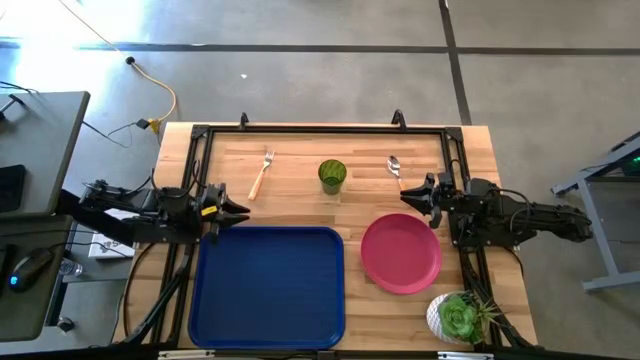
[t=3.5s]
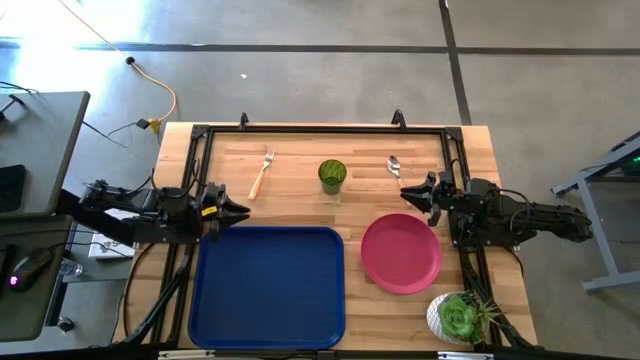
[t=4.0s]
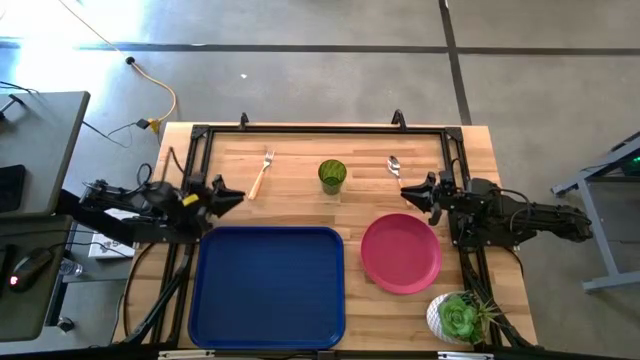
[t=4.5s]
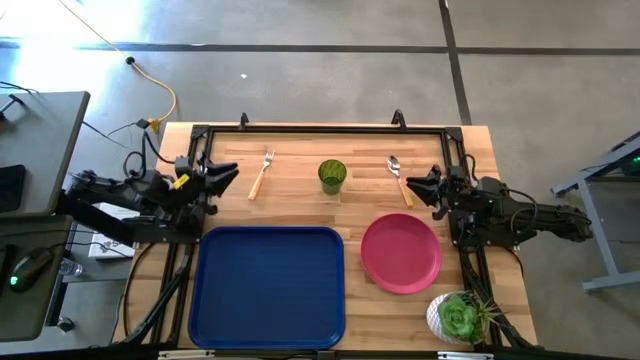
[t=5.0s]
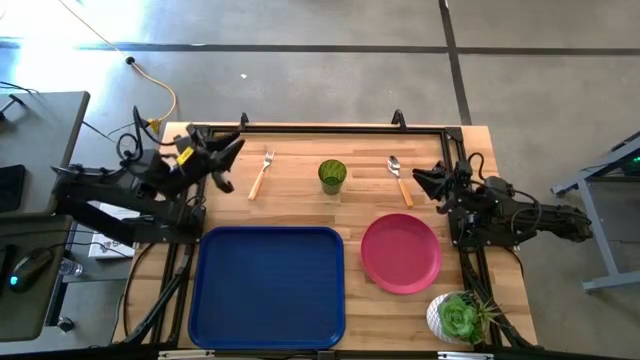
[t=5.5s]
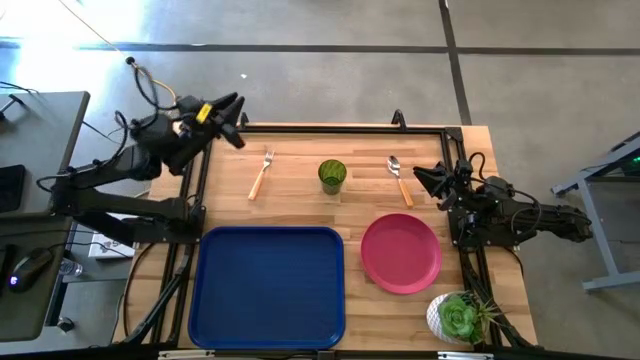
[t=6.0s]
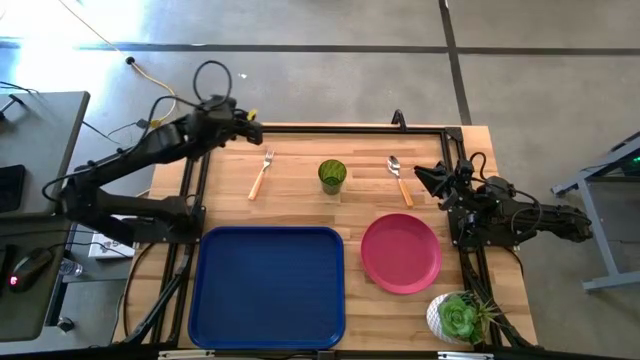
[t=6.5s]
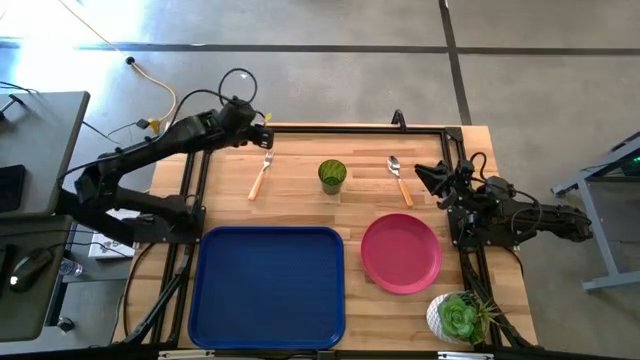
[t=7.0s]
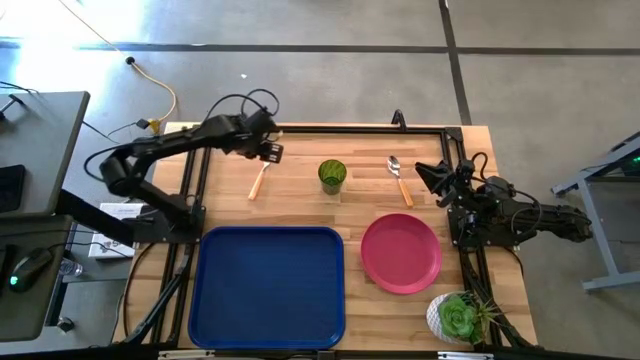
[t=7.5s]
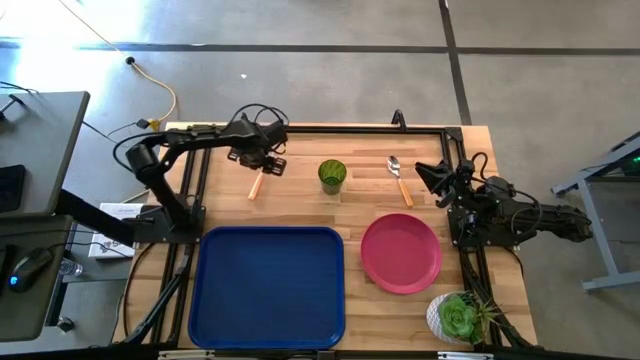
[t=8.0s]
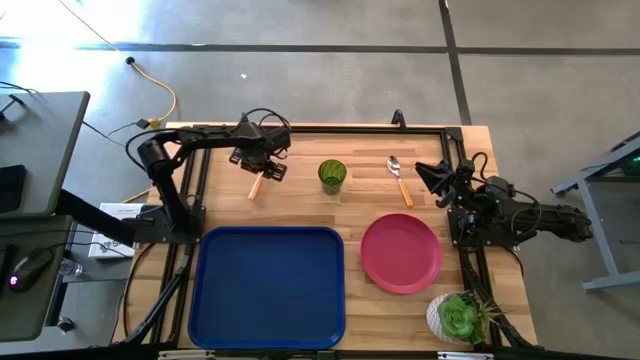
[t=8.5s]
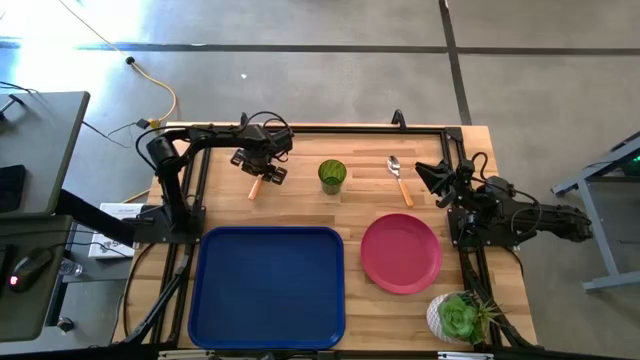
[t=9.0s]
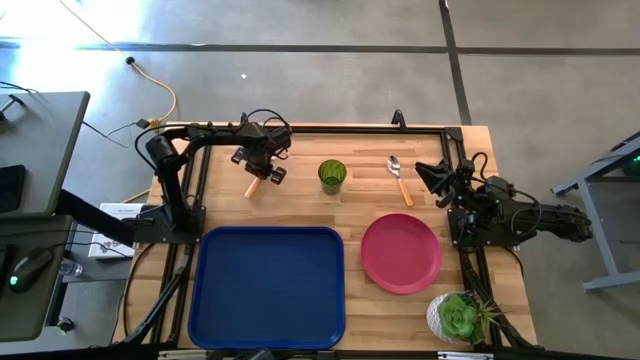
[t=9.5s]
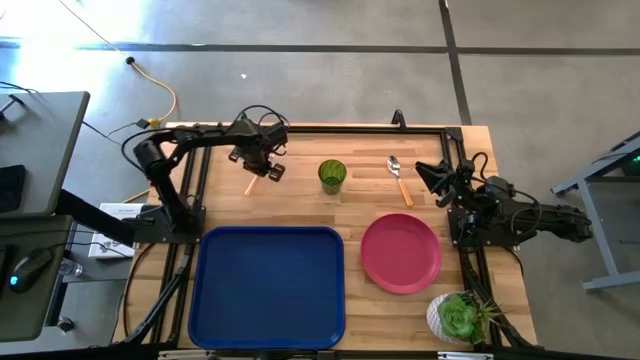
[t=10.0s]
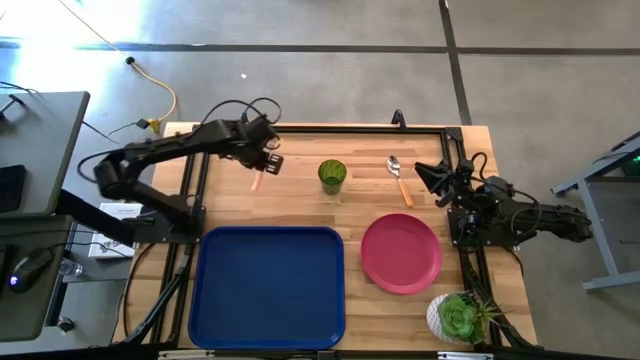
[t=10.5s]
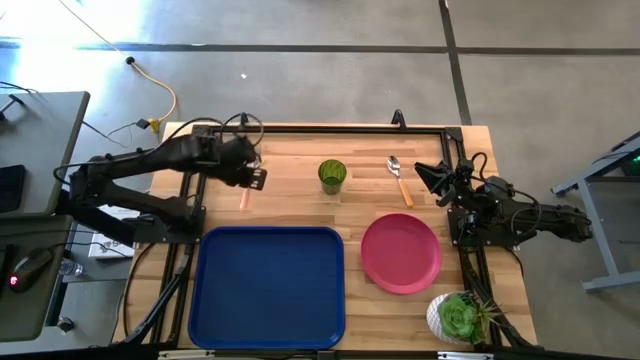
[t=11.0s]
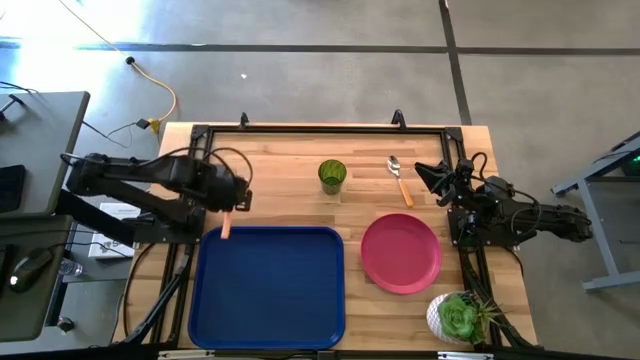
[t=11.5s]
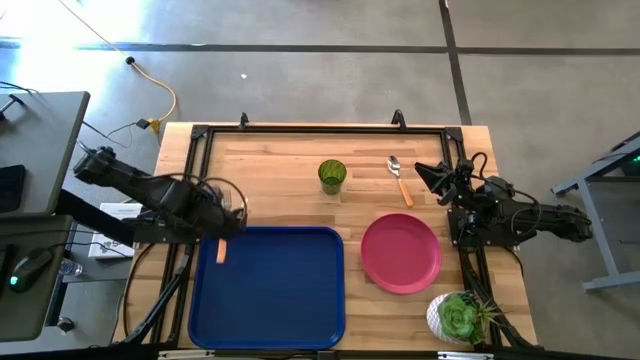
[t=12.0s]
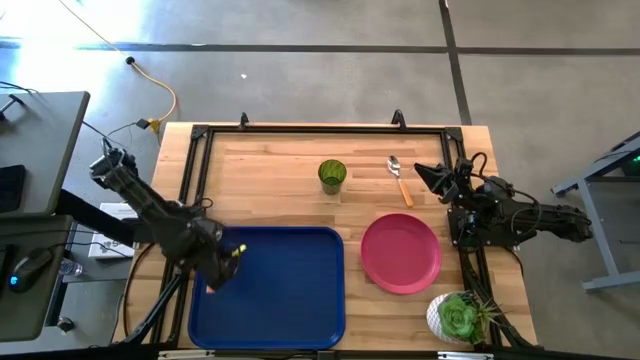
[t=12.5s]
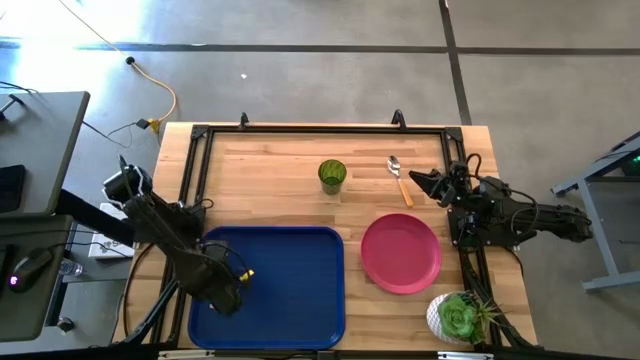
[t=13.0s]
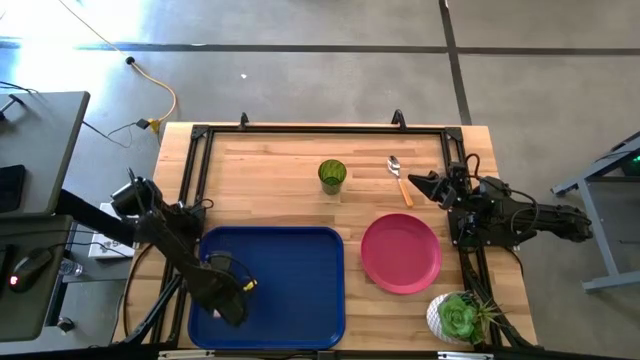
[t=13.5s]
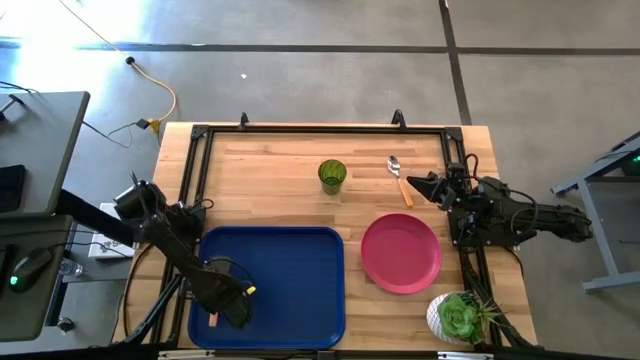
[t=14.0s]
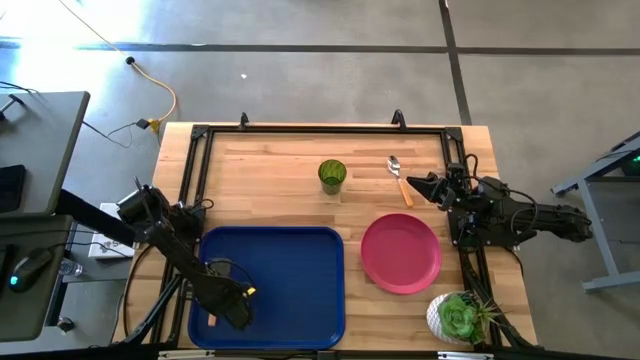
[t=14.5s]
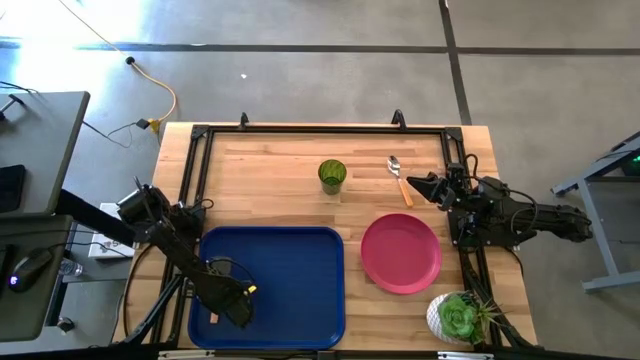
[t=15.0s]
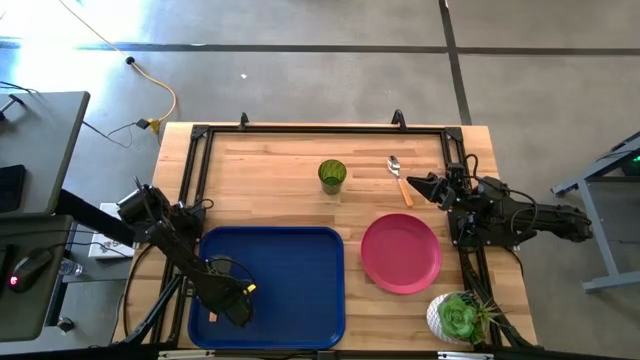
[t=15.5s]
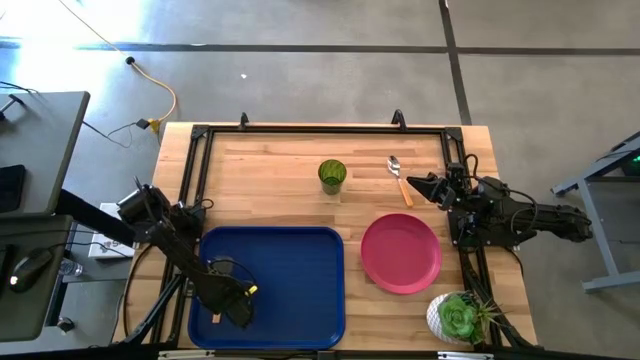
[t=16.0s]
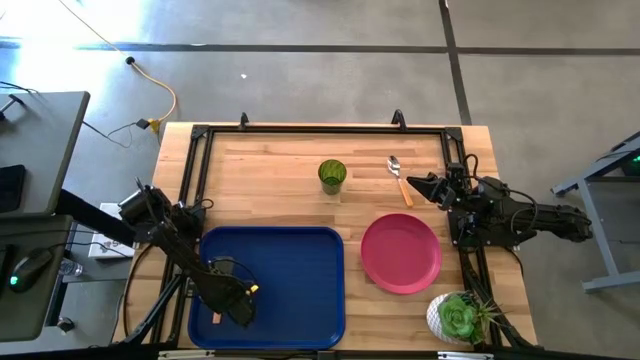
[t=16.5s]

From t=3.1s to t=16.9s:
Task: Pick and place plate/cup/fork/spoon on tray
Put the orange fork on the blue tray

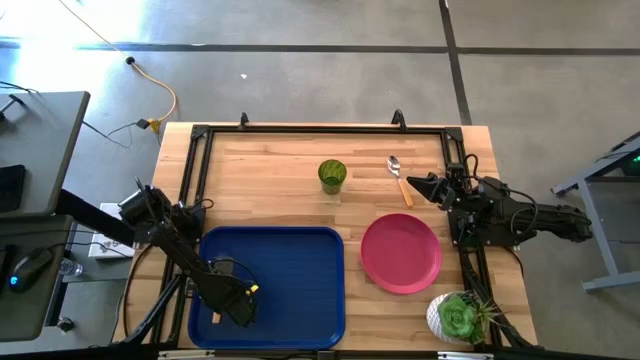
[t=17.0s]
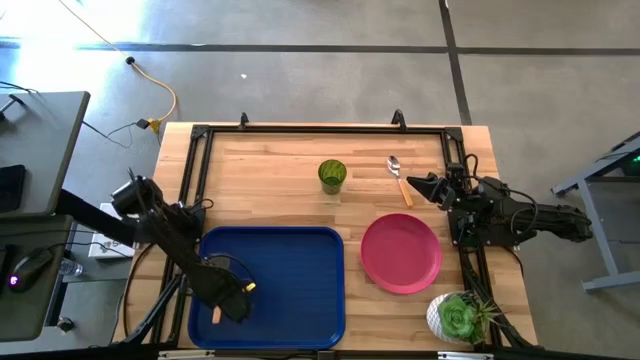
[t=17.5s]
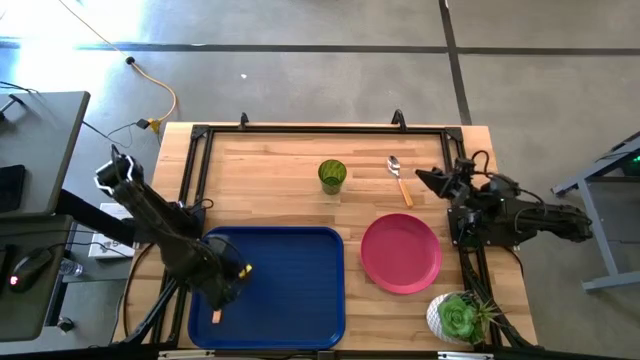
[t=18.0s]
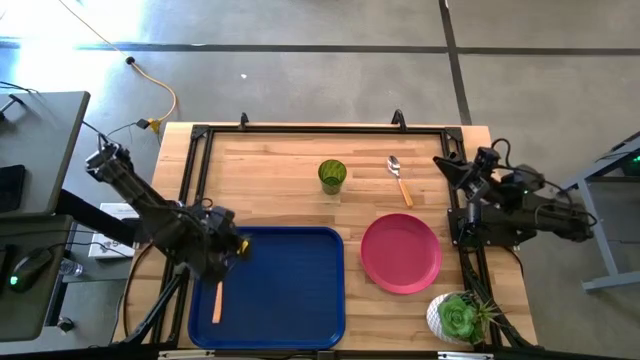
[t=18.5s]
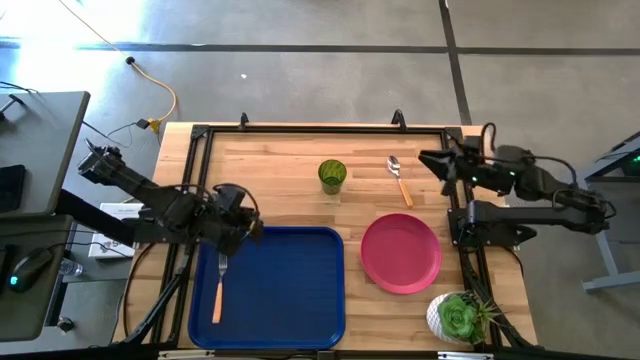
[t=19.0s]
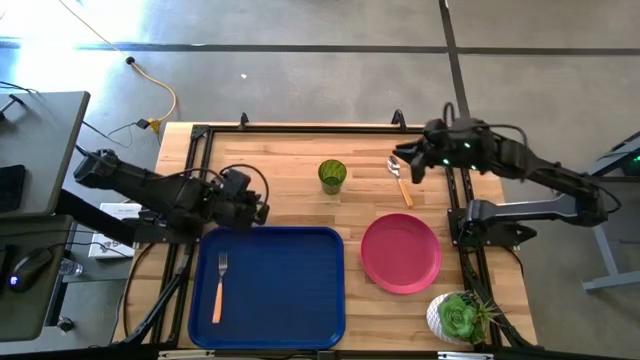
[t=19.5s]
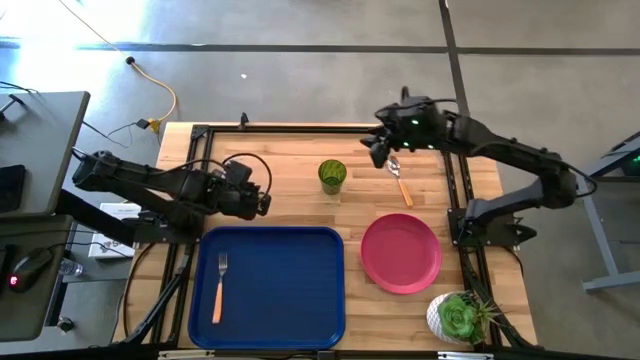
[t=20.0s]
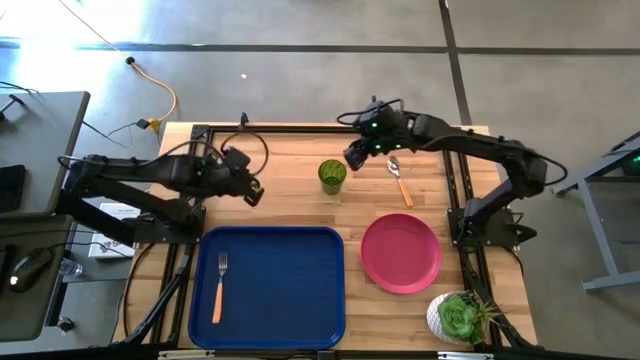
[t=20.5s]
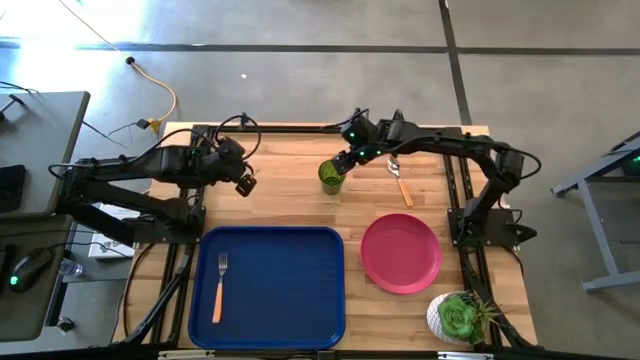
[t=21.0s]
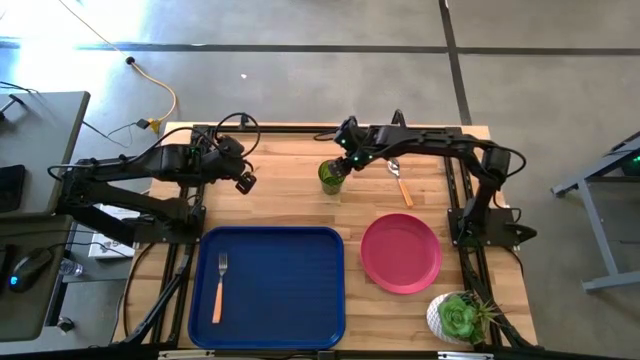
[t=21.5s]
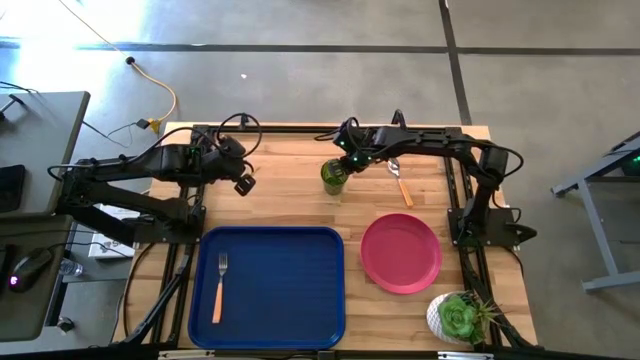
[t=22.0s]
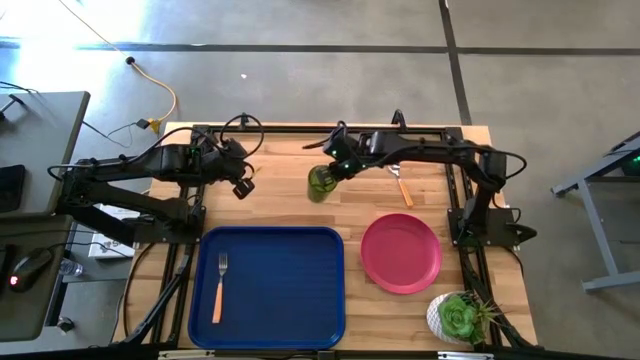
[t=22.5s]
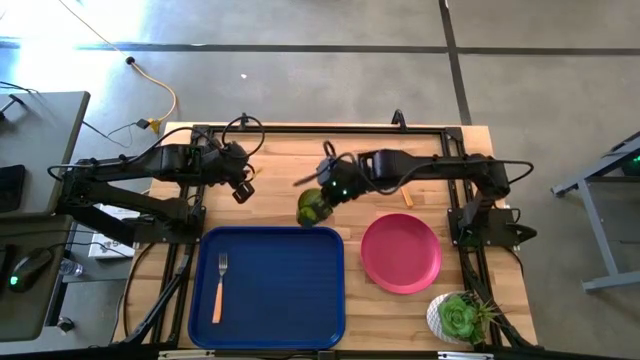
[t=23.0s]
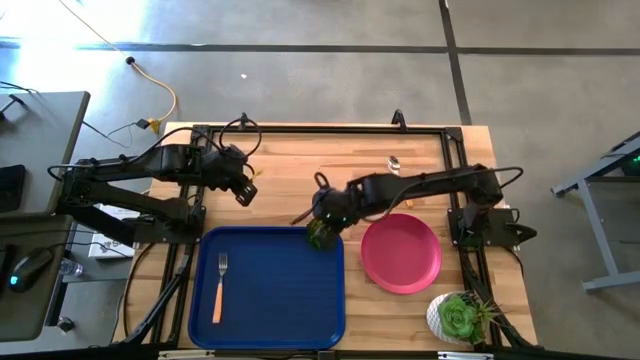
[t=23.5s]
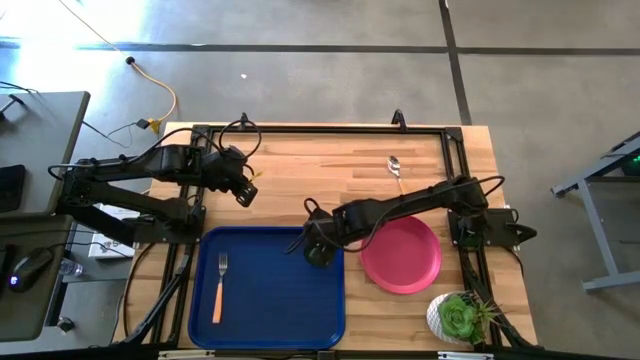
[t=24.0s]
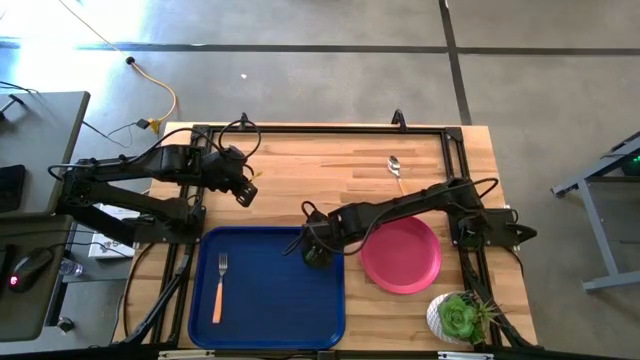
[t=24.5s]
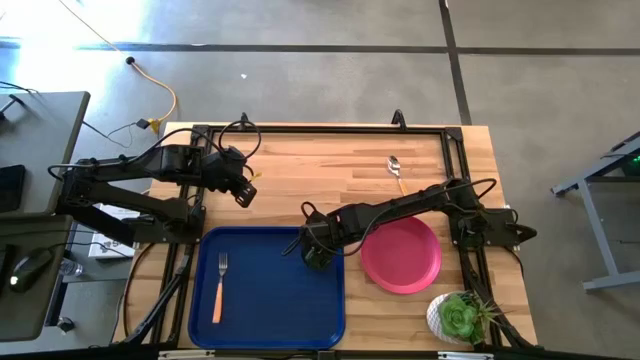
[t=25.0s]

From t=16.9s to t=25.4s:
Put the green glass on the top right of the blue tray
